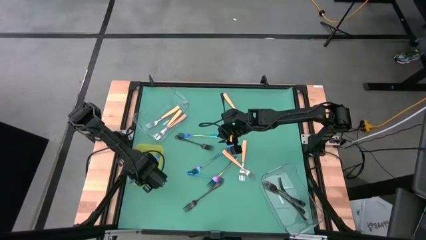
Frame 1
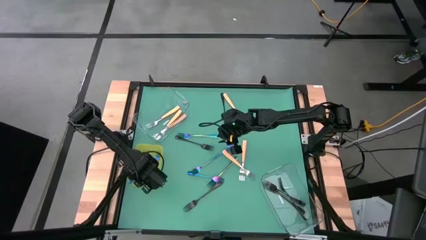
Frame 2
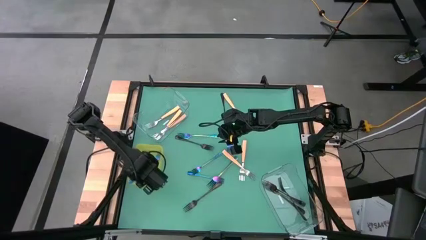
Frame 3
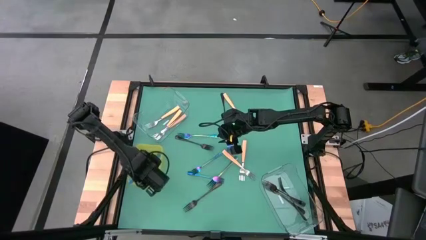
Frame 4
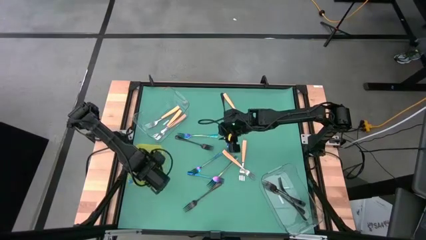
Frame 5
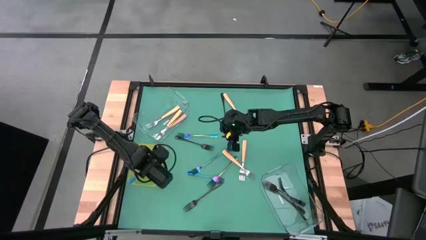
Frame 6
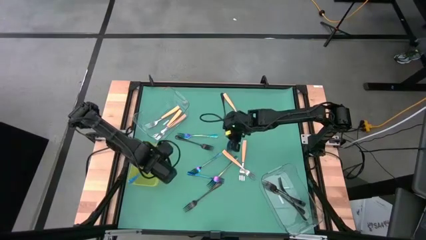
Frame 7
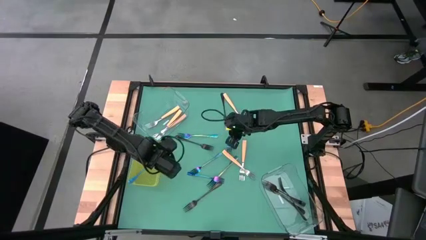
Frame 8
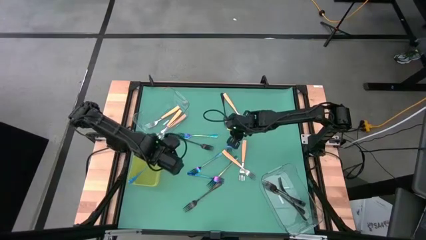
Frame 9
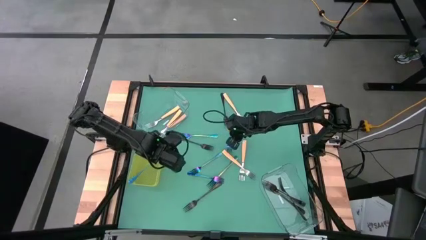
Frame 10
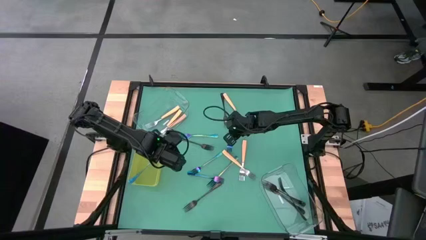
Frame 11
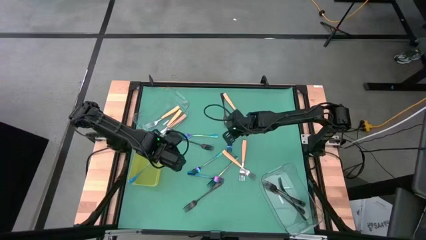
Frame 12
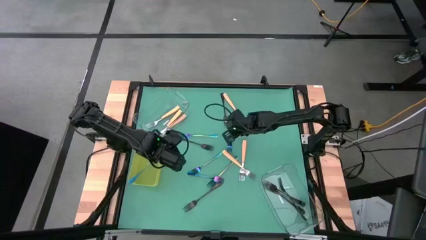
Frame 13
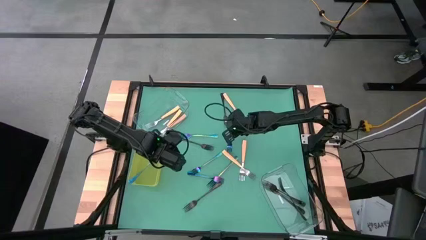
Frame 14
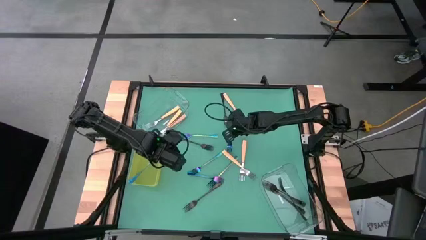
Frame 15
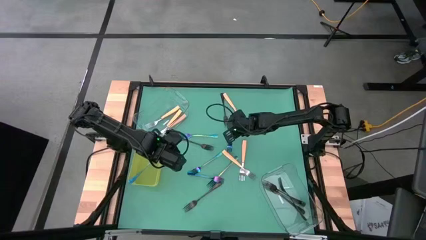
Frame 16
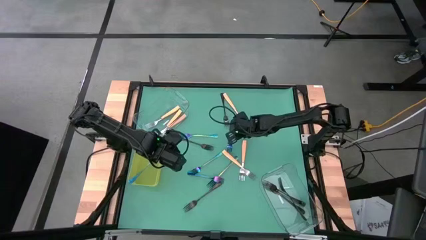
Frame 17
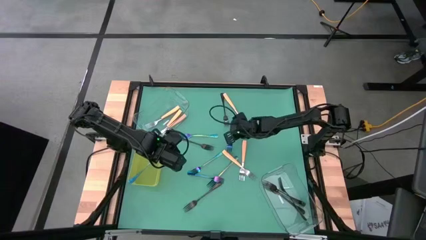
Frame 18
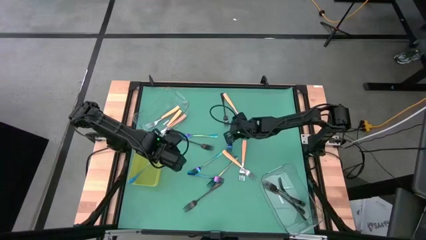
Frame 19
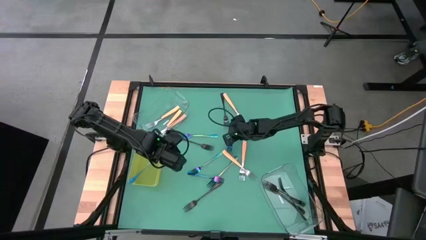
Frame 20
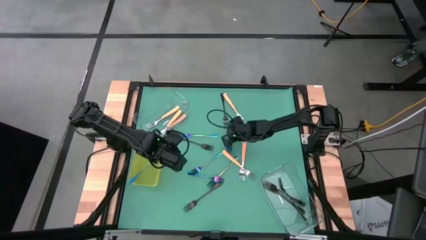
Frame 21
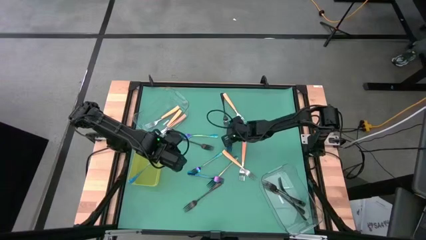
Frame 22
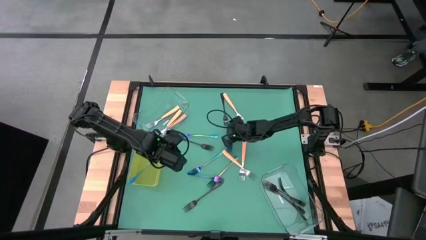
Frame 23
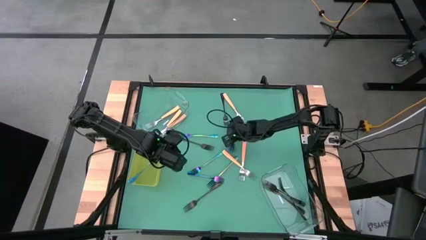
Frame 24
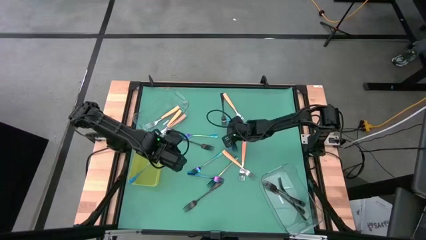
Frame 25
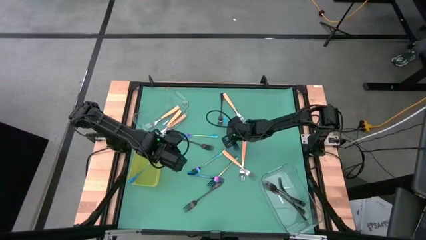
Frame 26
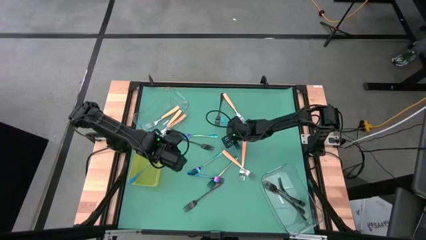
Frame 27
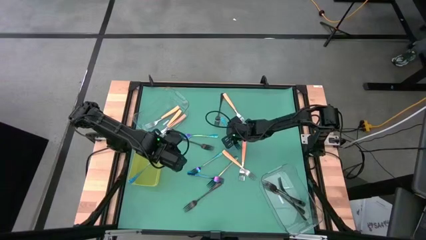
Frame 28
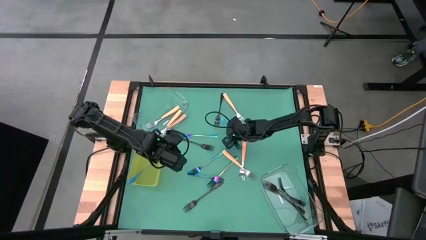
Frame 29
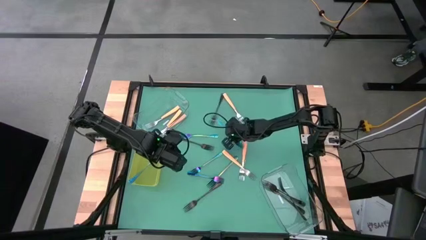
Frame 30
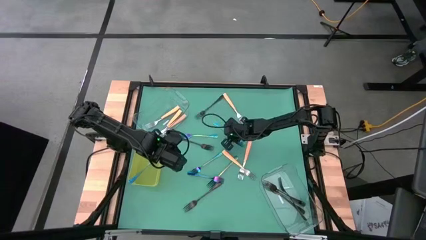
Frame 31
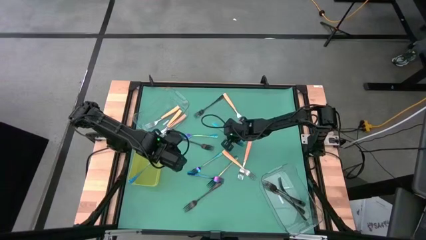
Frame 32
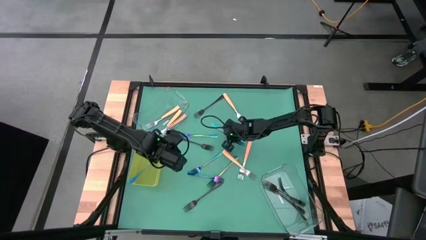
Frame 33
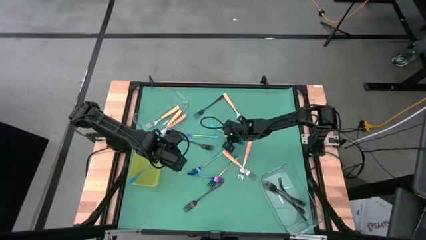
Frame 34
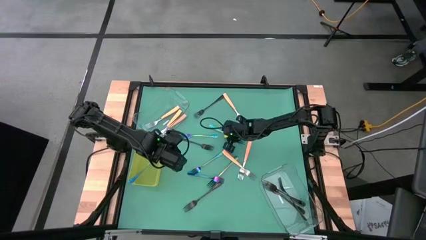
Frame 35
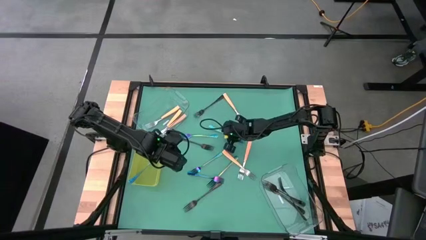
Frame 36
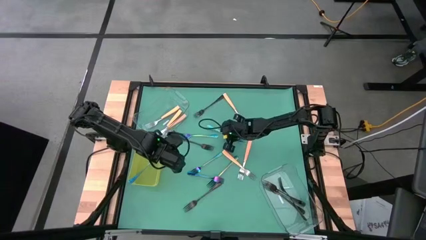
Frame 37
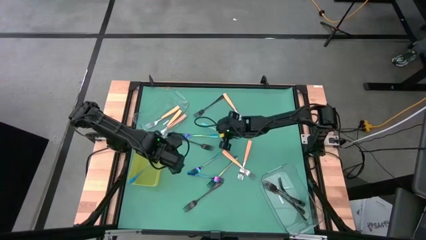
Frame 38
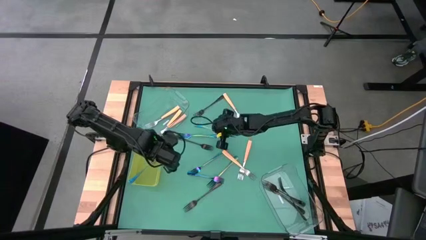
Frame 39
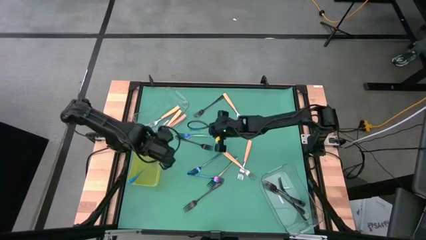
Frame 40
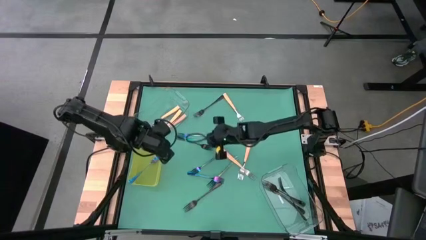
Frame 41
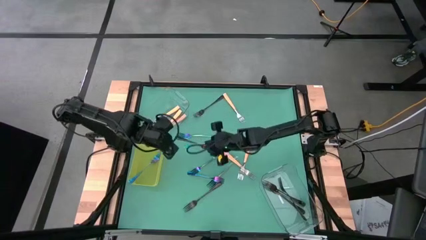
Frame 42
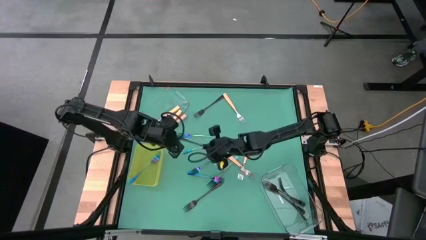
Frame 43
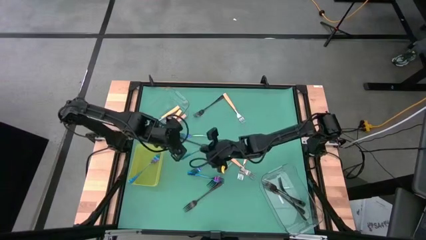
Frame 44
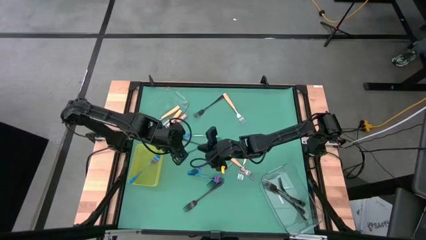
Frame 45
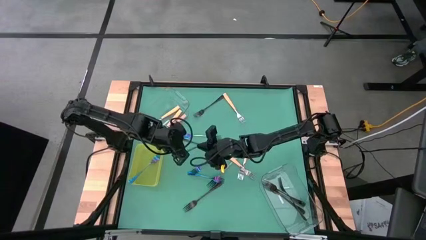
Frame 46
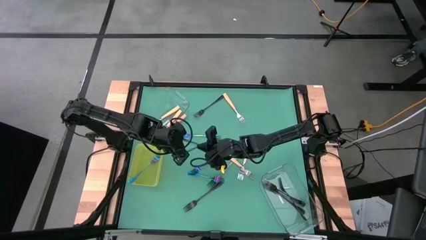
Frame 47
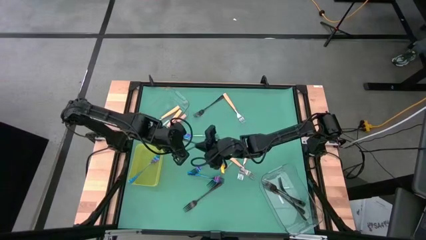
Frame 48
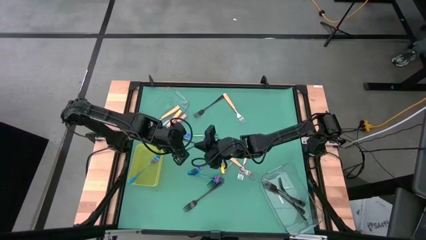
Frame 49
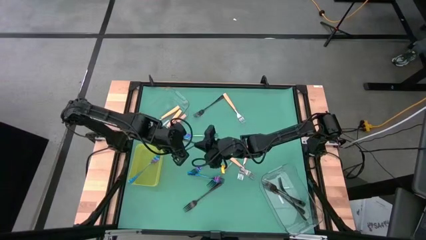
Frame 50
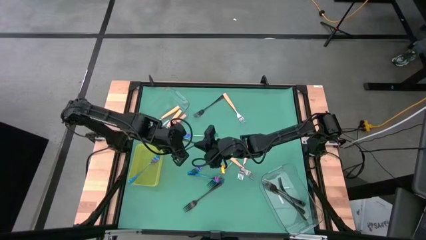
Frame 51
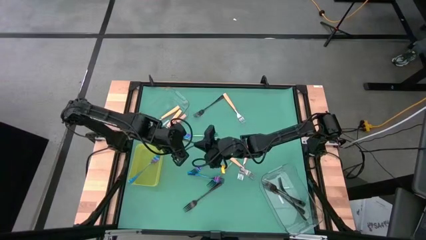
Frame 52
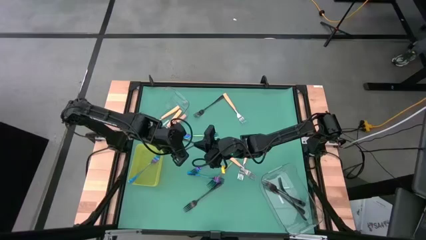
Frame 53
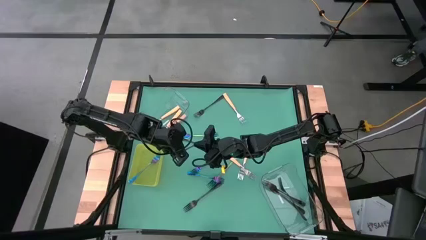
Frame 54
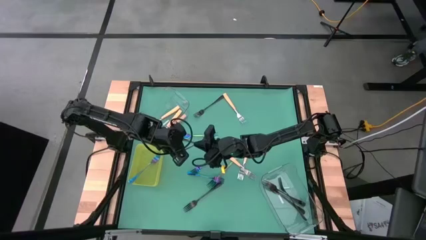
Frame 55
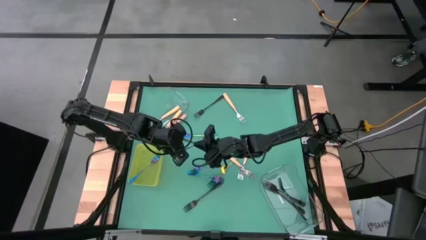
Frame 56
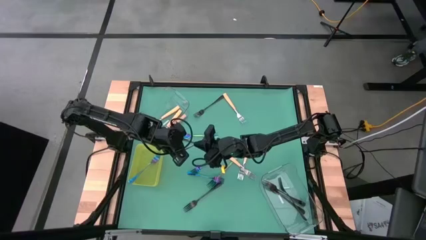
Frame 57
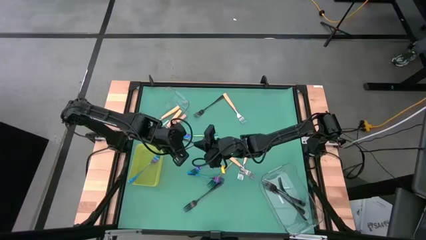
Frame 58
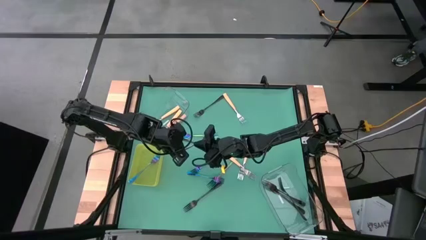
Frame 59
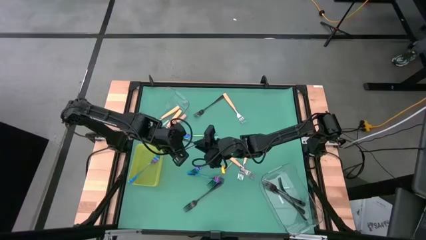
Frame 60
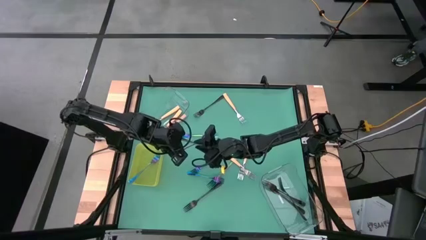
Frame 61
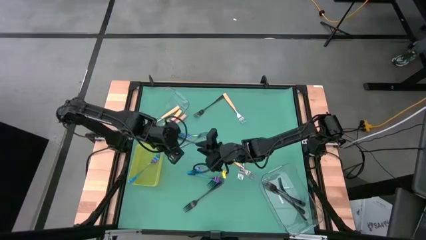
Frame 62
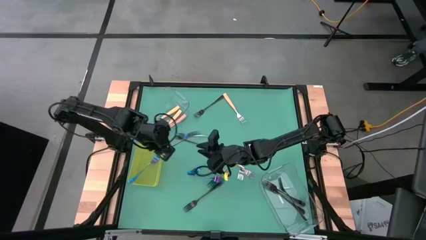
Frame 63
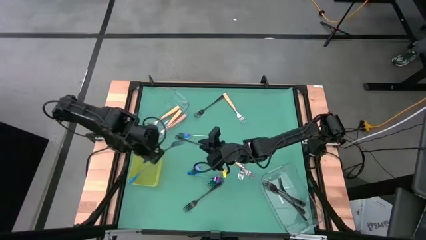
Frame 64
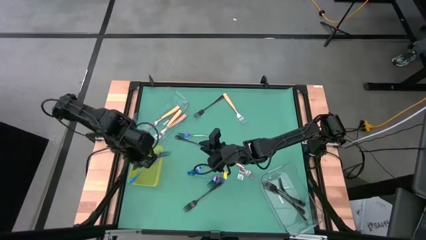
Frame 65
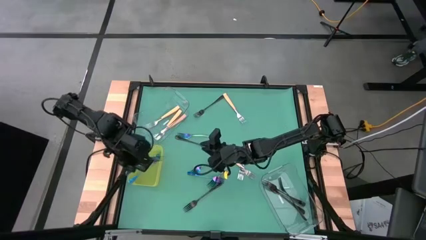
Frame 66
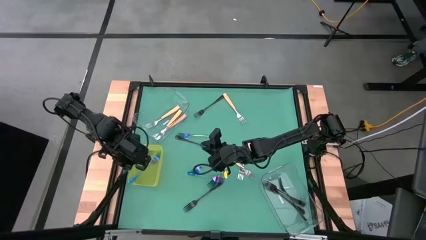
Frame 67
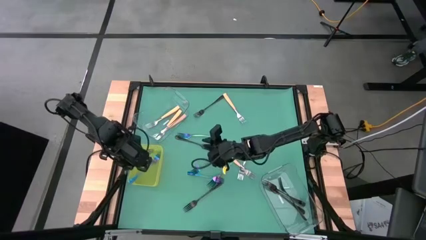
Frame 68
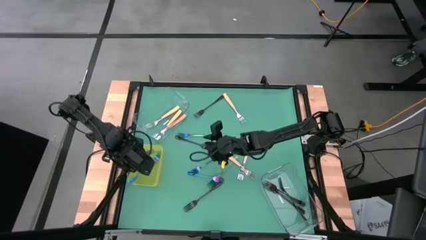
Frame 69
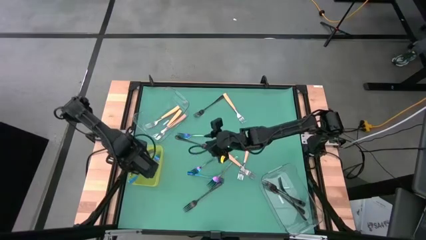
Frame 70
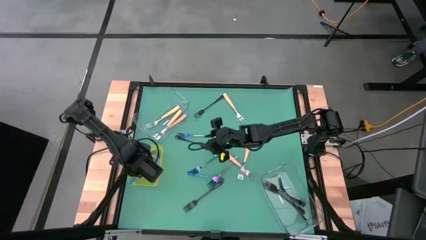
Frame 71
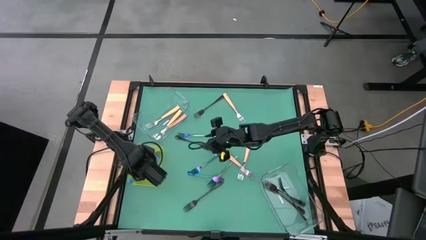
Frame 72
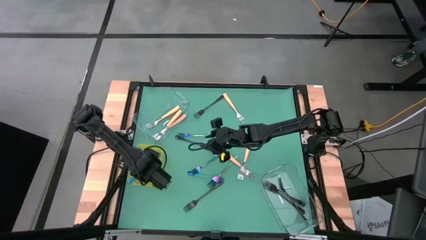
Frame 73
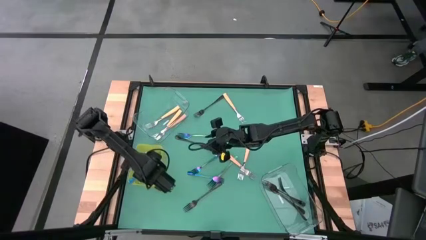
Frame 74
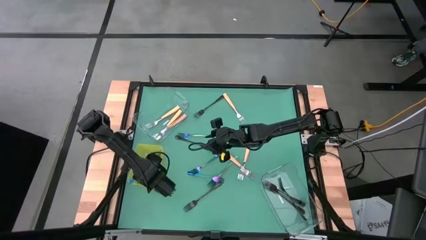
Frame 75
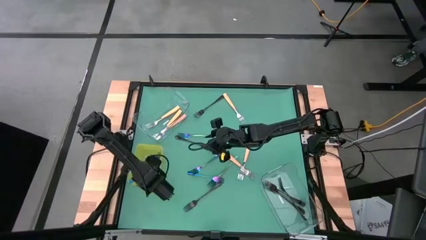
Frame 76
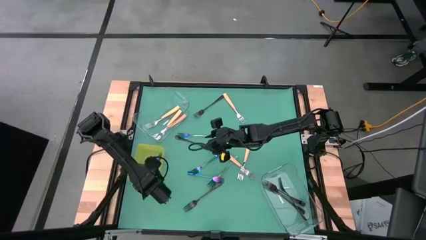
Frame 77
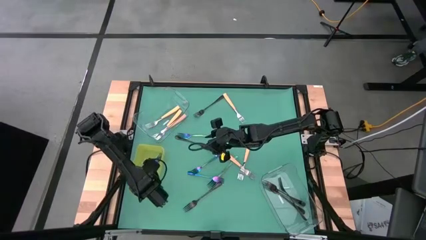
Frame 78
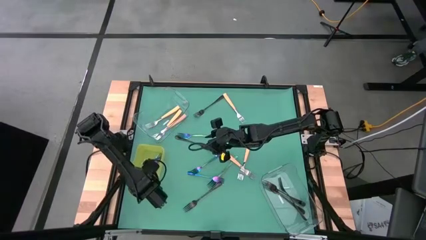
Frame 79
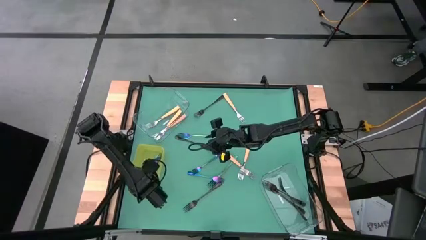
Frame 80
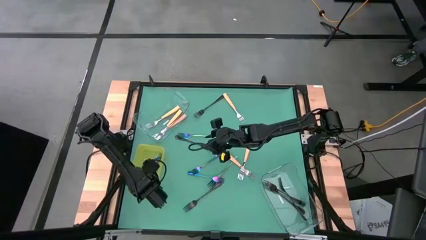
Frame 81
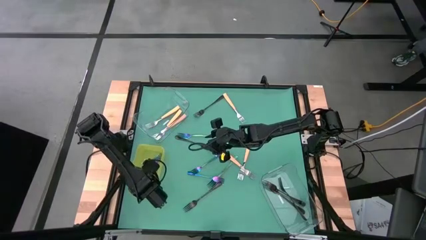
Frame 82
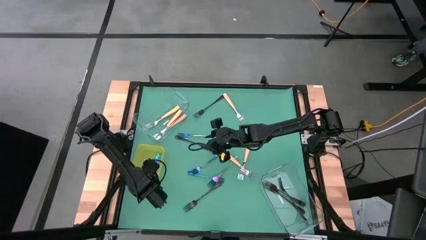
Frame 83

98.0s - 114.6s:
Task: Sort silverware by color (type)
Put the blue fork in the yellow bin
